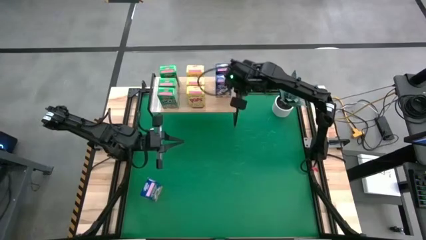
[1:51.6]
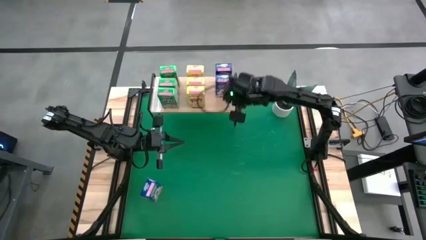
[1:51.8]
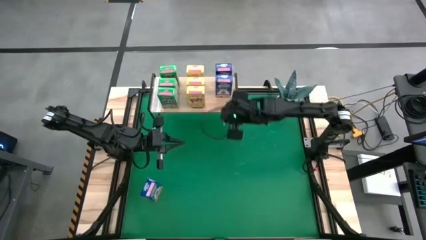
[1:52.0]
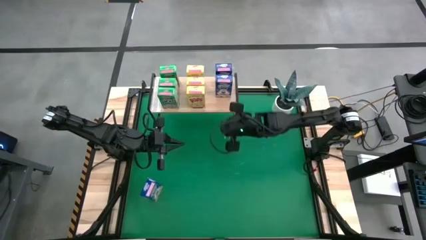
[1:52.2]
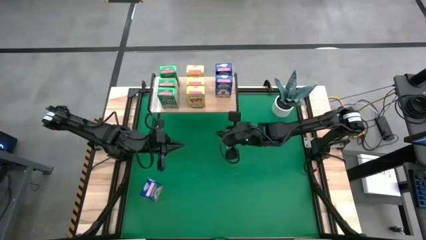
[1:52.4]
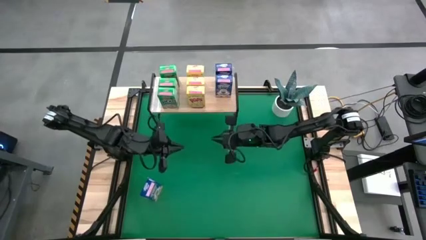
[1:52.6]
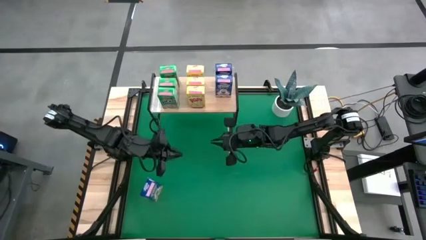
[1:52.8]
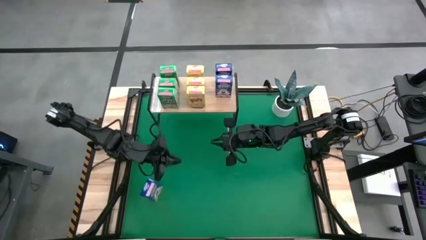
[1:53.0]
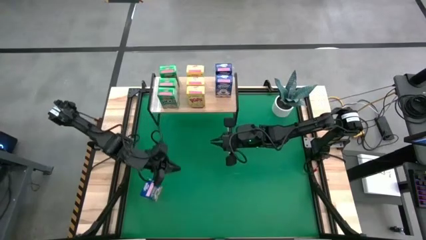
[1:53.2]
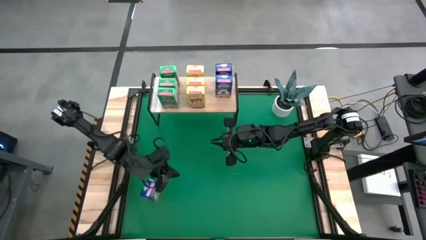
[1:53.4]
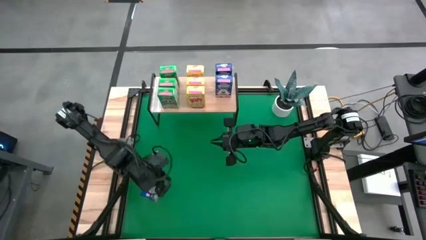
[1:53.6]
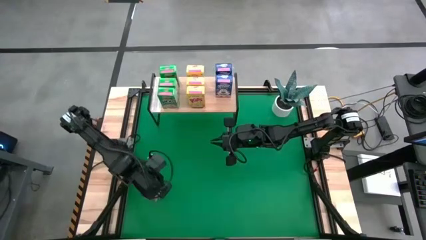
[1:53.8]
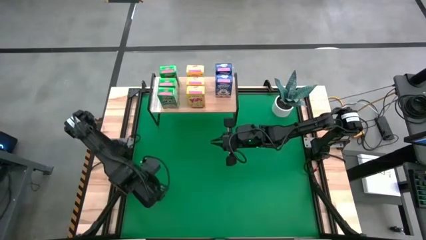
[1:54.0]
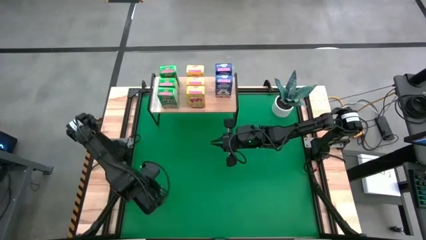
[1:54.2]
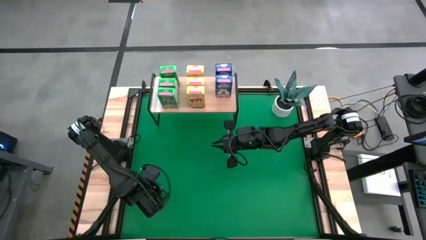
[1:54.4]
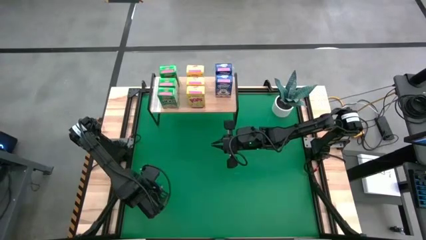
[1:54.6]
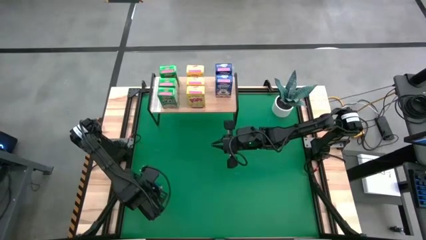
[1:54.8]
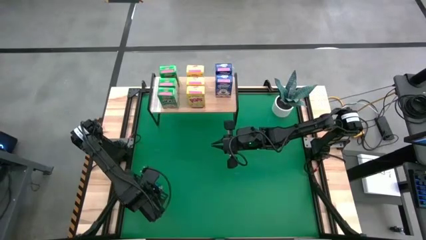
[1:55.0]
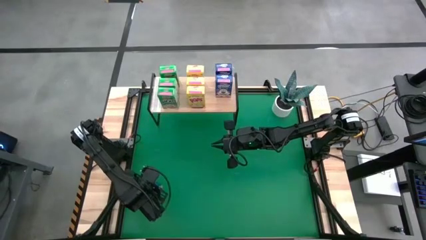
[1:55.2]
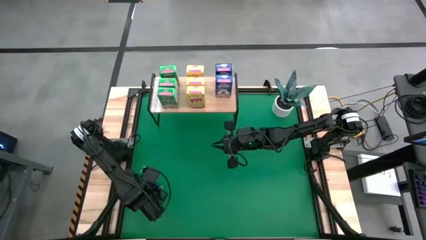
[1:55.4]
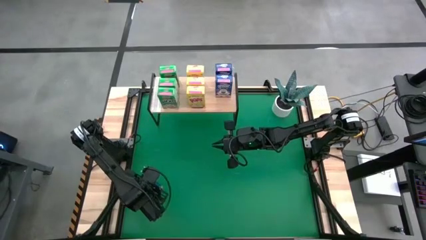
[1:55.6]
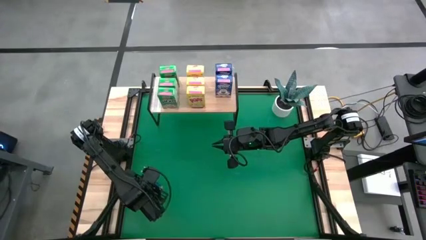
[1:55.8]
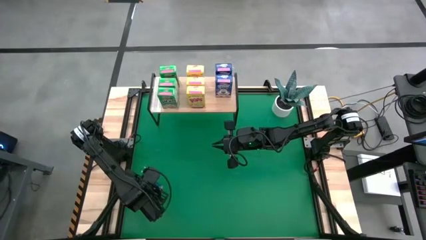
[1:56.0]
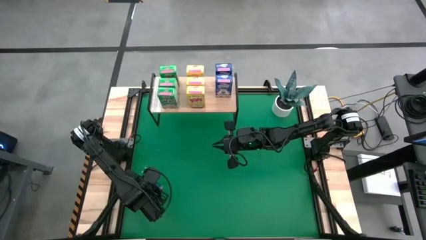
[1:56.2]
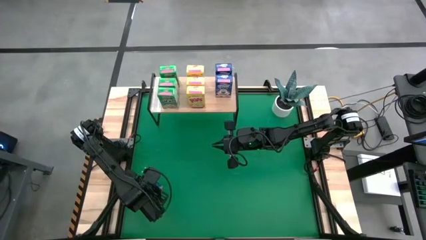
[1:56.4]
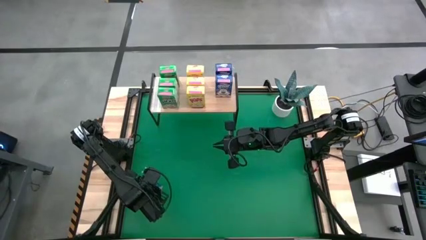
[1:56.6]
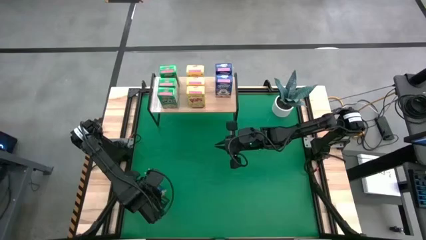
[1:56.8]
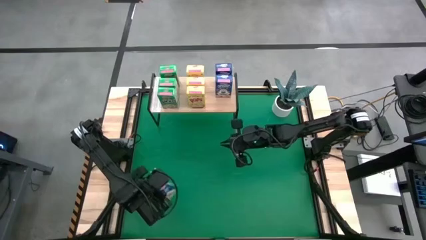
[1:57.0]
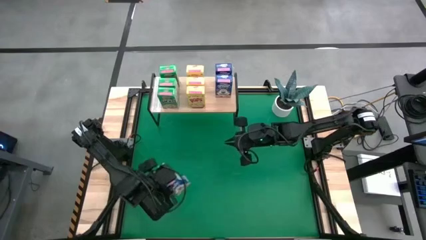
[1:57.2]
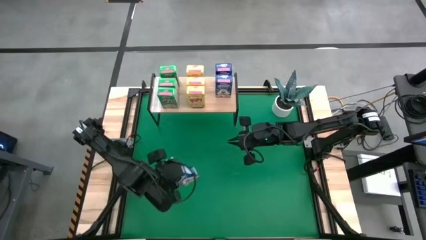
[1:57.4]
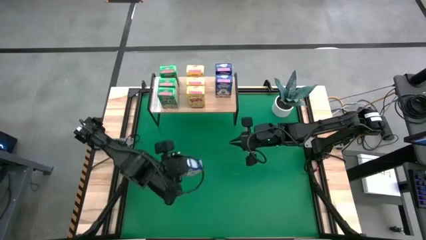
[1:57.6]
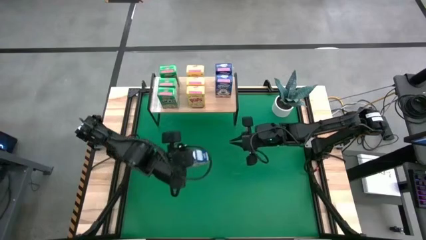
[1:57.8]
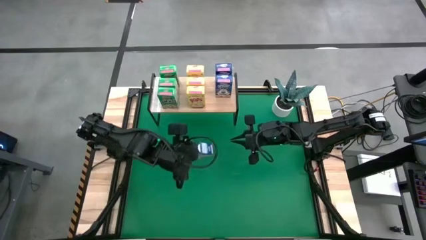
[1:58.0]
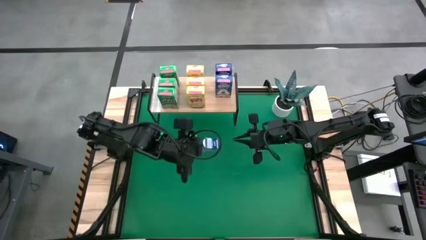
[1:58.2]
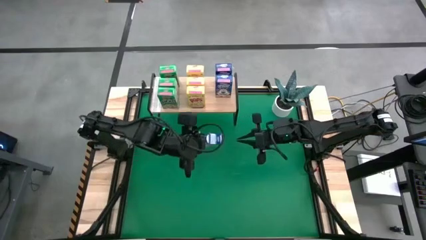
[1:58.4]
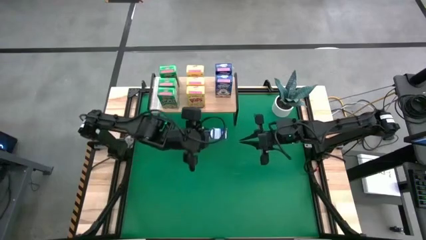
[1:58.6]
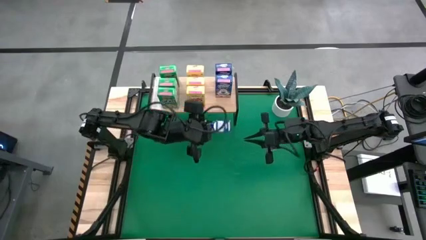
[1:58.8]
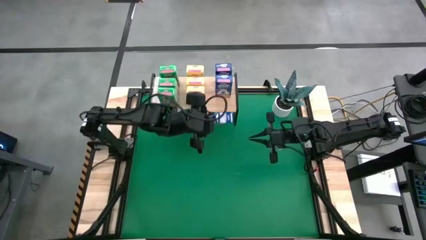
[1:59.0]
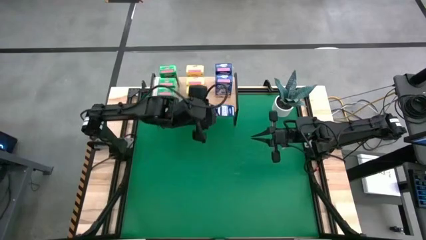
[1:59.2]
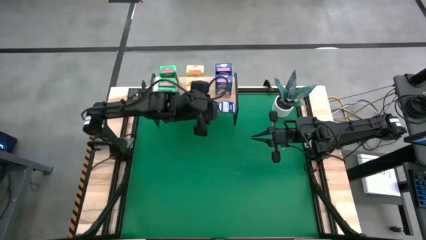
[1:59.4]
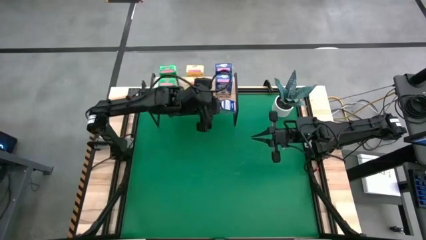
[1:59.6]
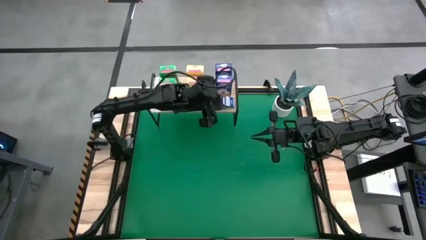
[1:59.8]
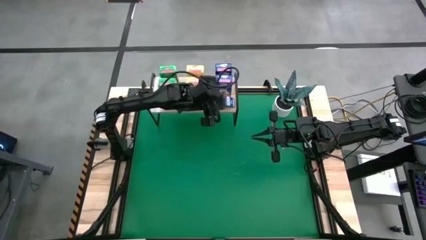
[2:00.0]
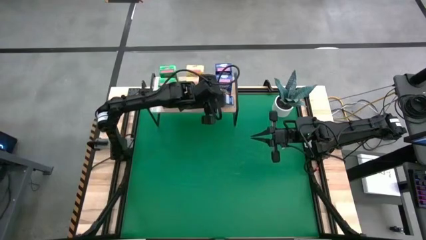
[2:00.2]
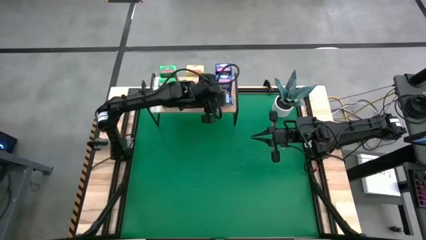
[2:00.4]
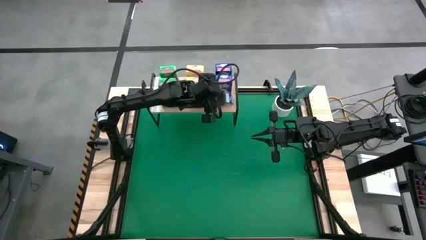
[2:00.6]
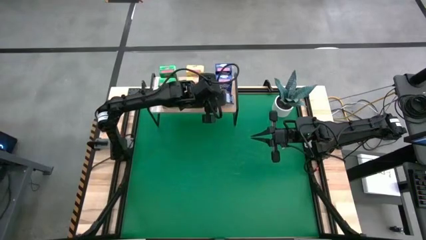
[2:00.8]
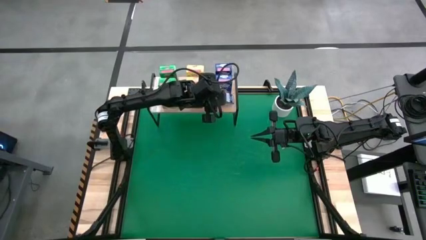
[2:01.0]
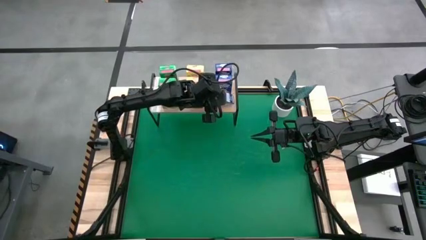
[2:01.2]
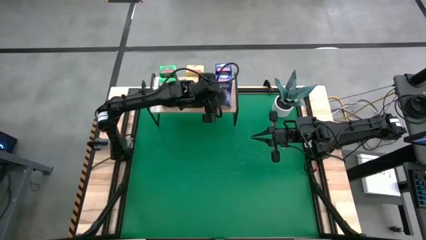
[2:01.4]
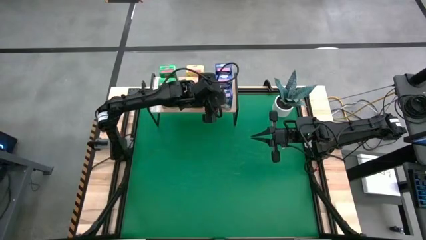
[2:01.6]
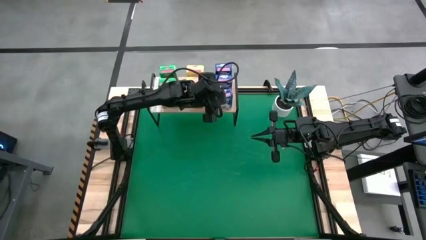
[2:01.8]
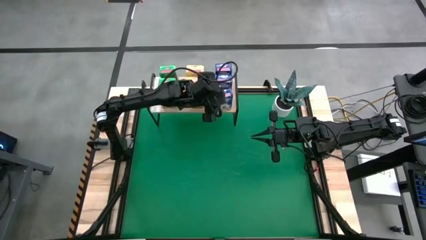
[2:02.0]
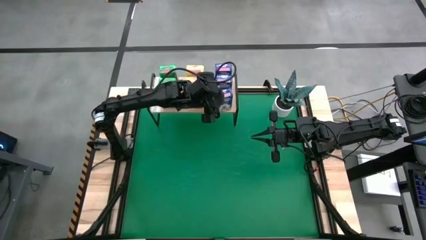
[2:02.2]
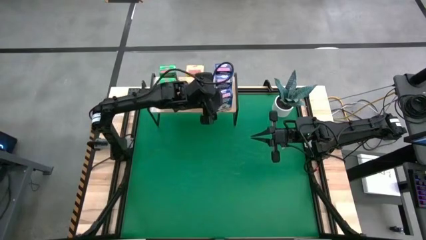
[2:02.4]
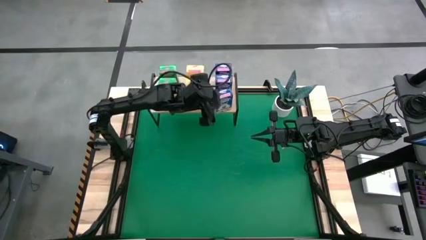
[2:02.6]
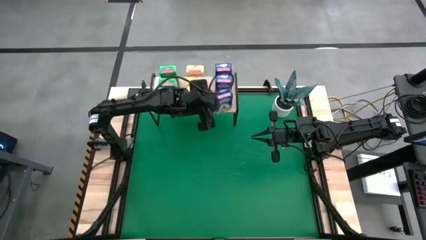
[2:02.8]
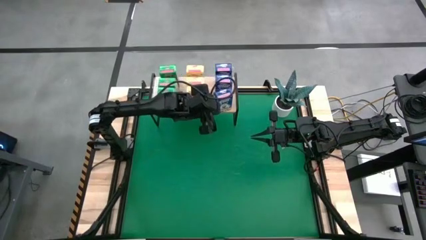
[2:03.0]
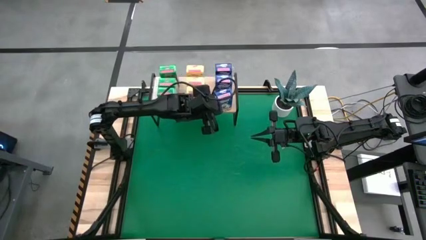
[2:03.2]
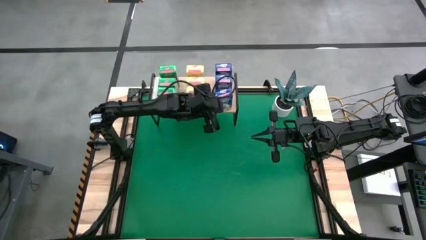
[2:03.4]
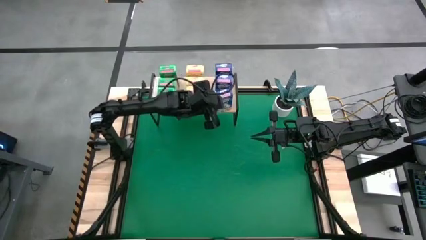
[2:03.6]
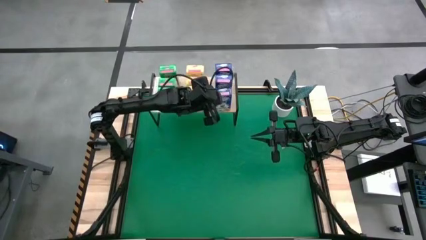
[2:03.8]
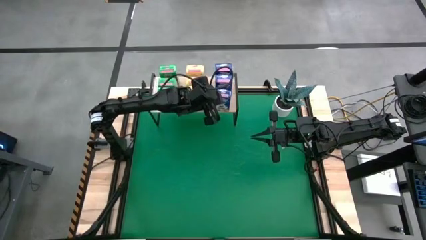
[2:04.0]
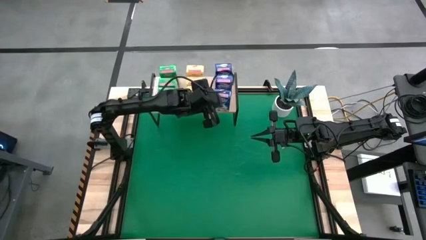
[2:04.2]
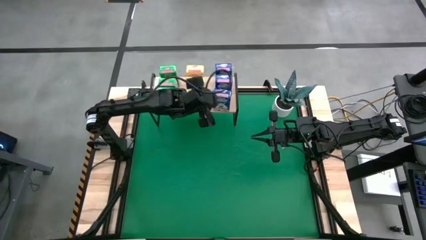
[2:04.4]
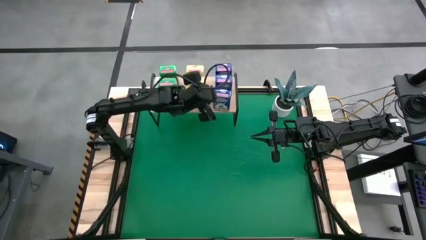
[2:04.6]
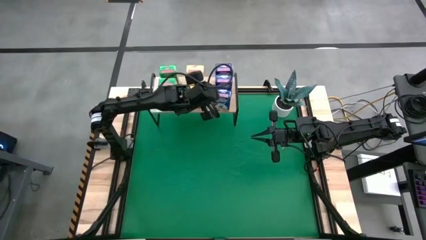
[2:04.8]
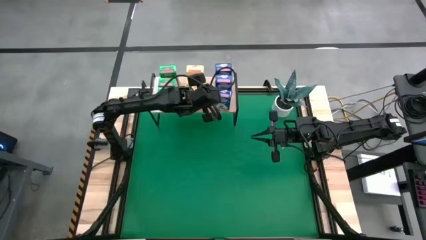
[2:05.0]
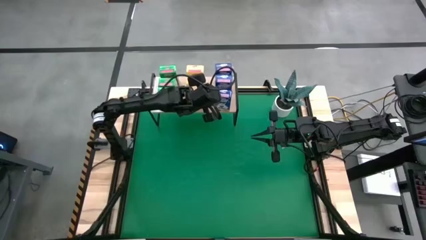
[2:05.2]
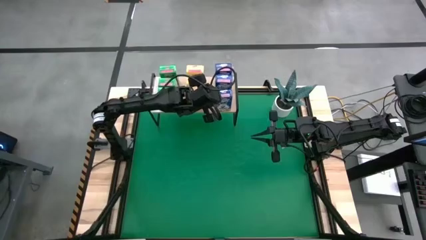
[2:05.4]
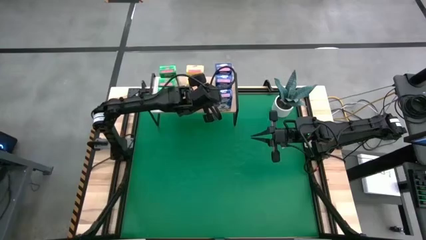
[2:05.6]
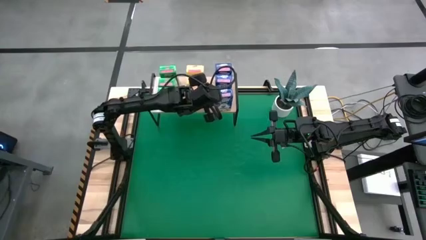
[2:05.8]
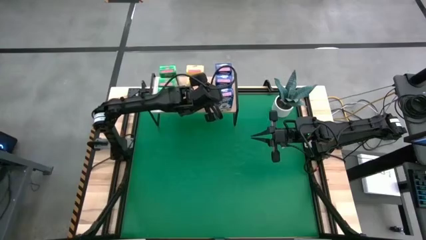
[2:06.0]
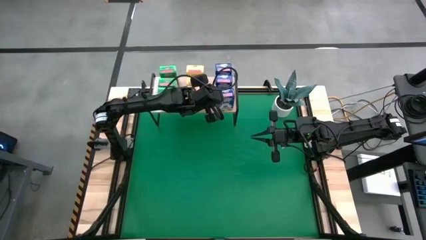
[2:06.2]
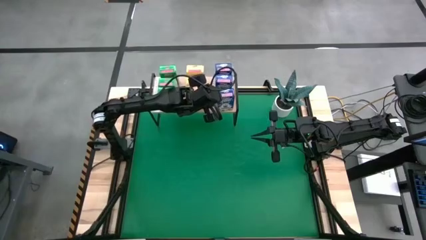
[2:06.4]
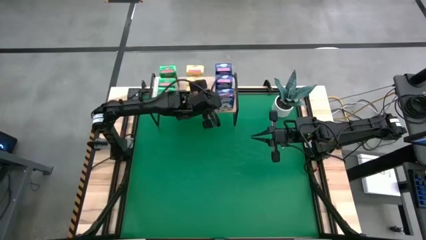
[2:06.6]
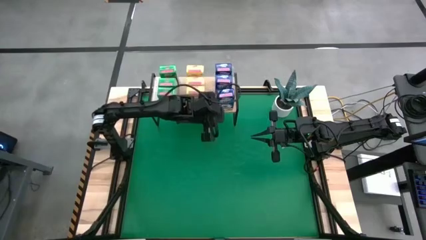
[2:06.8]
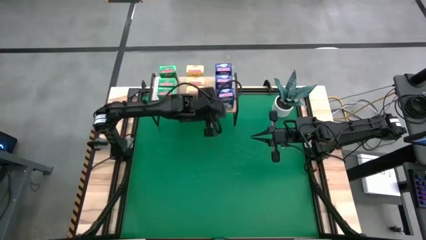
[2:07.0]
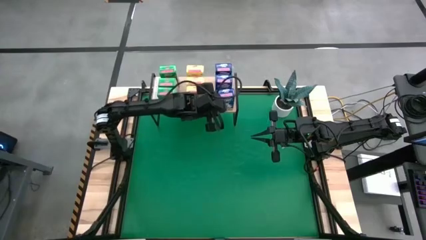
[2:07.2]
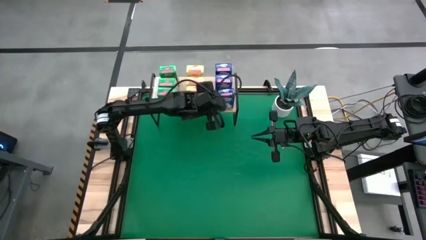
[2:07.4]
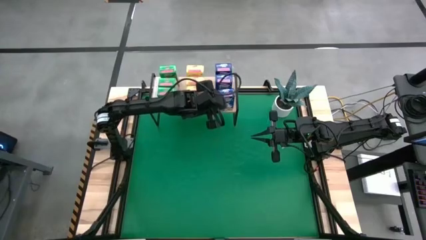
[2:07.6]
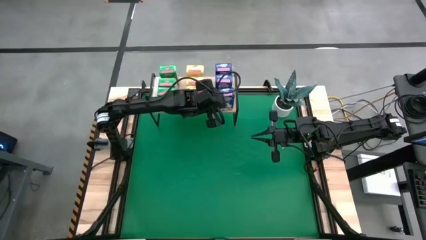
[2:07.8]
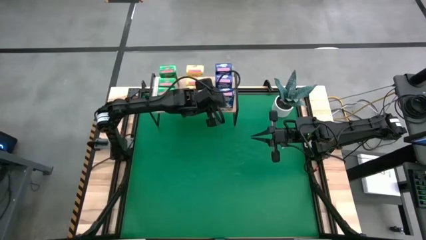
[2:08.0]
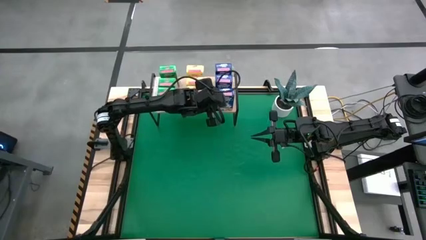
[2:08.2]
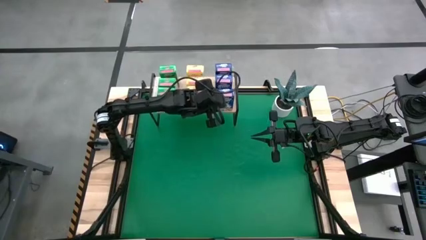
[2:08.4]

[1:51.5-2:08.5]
Task: Stack cereal on shelf
Put the blue cereal box on the shelf aligned with the other blue cereal boxes
